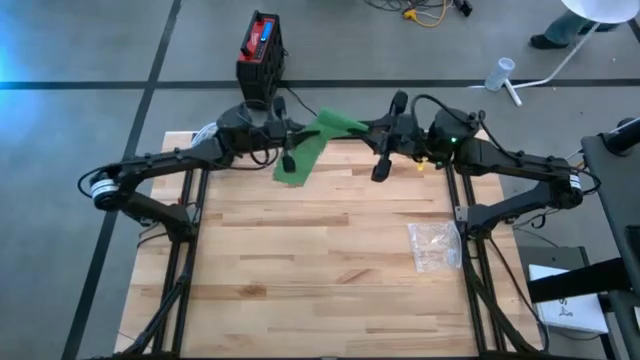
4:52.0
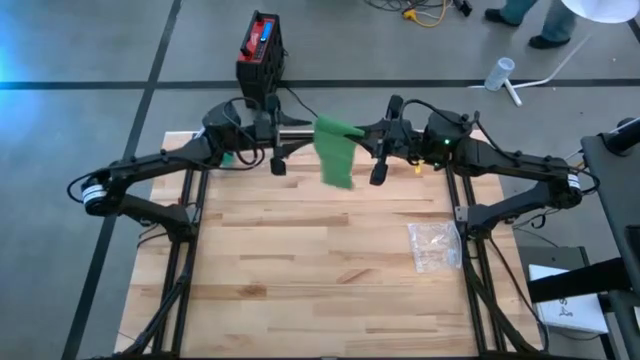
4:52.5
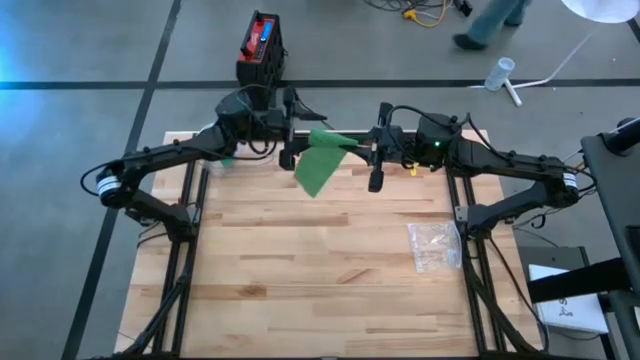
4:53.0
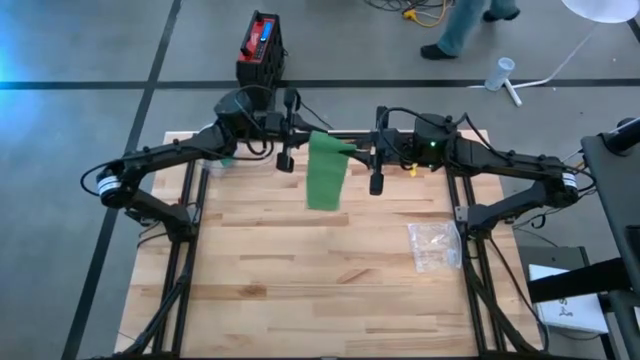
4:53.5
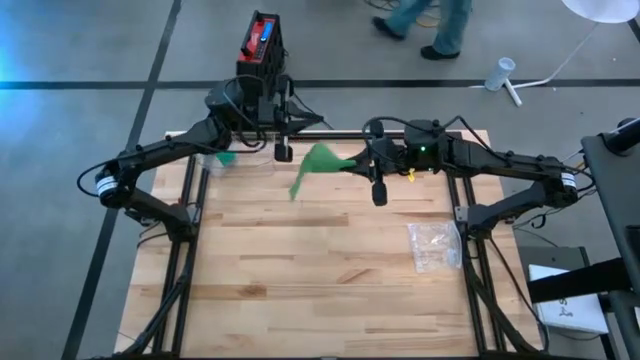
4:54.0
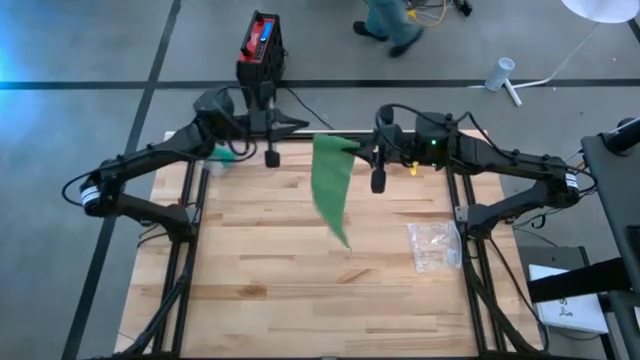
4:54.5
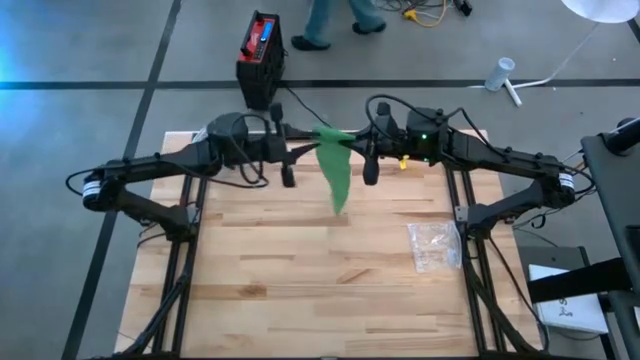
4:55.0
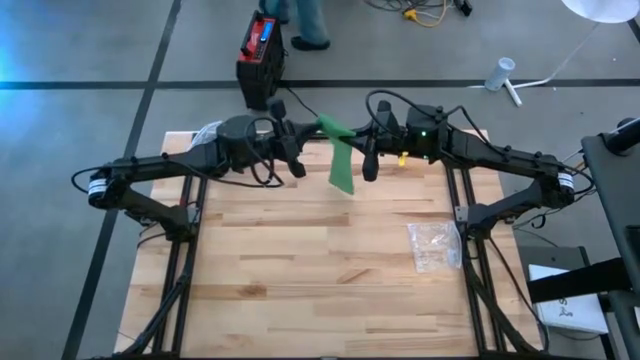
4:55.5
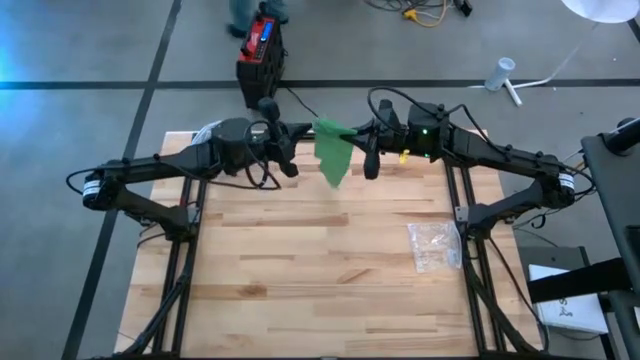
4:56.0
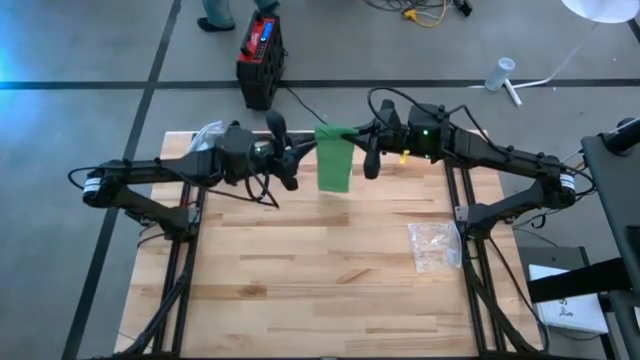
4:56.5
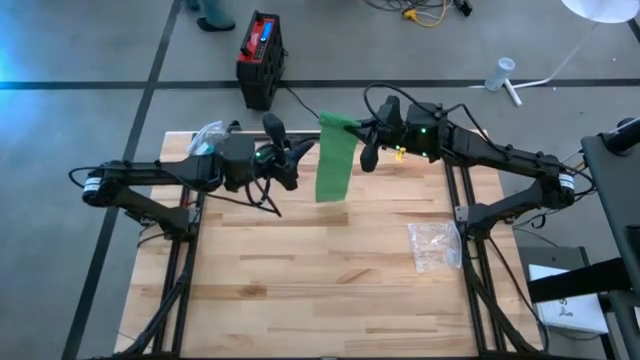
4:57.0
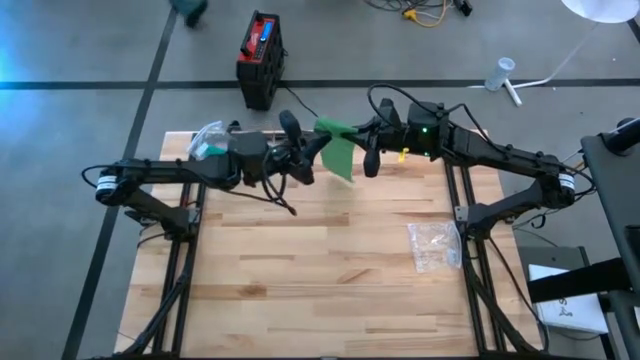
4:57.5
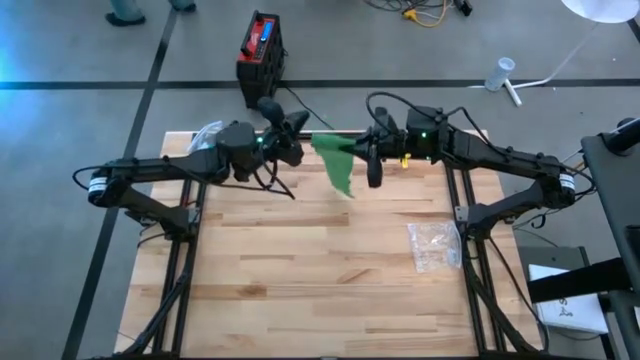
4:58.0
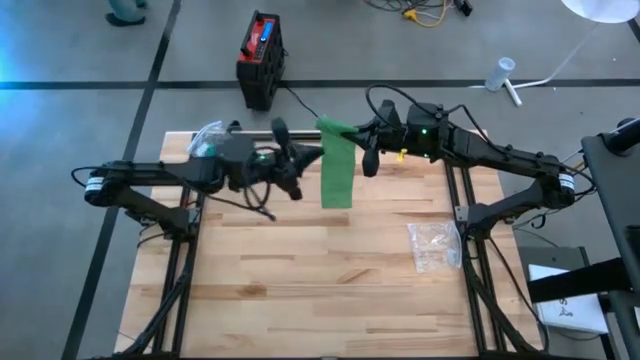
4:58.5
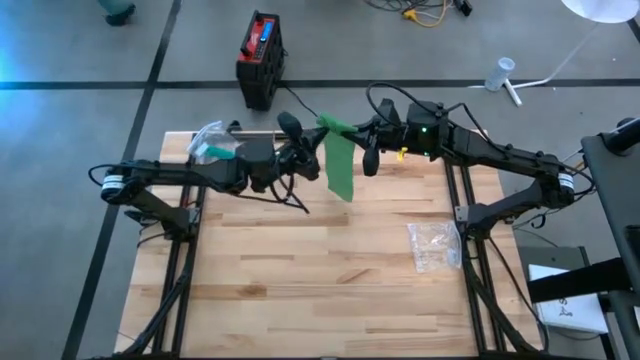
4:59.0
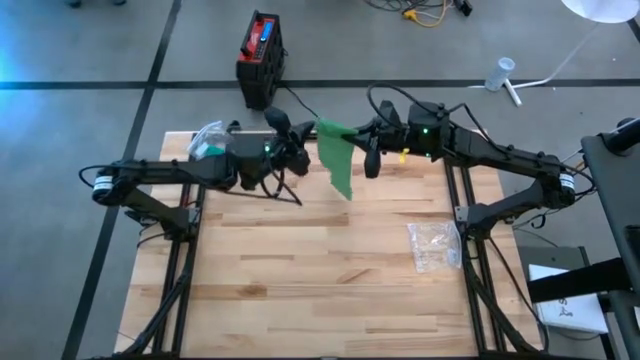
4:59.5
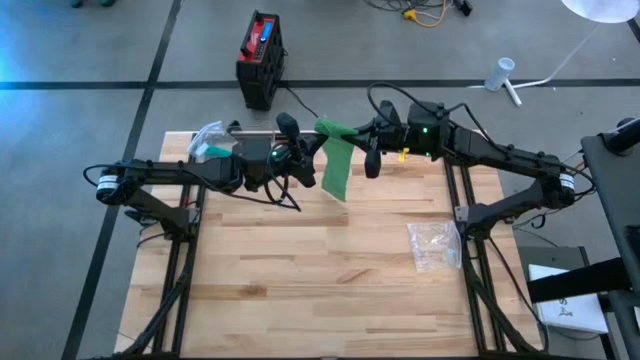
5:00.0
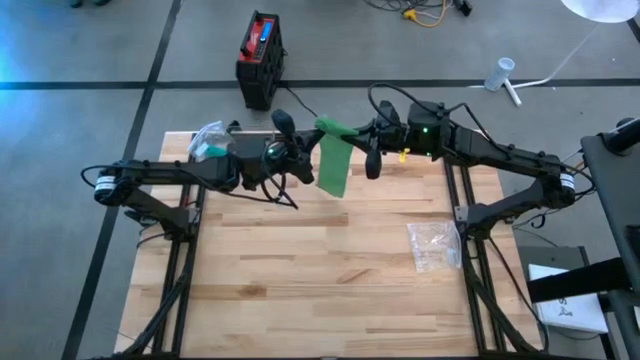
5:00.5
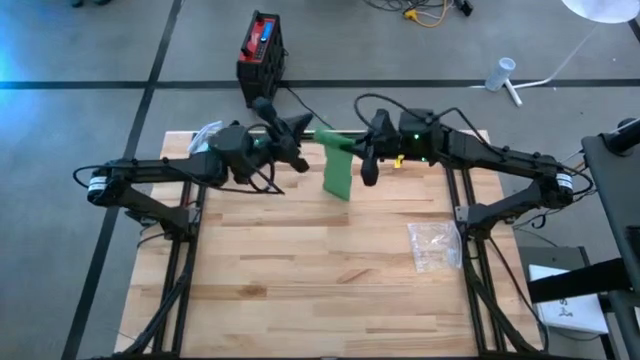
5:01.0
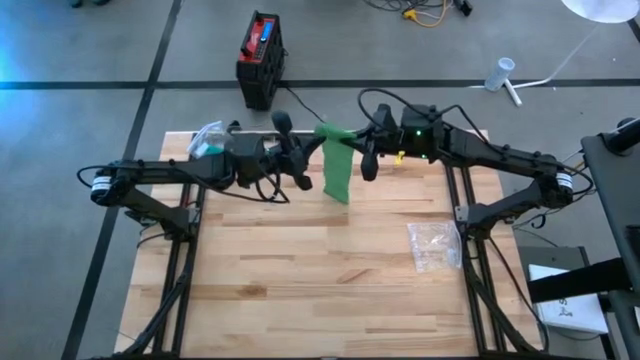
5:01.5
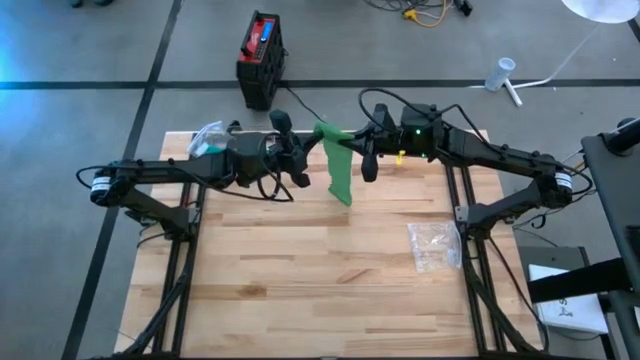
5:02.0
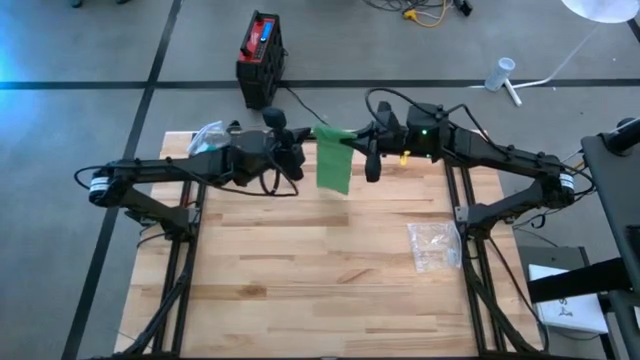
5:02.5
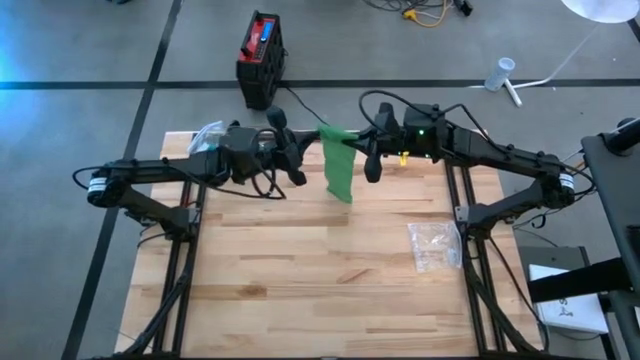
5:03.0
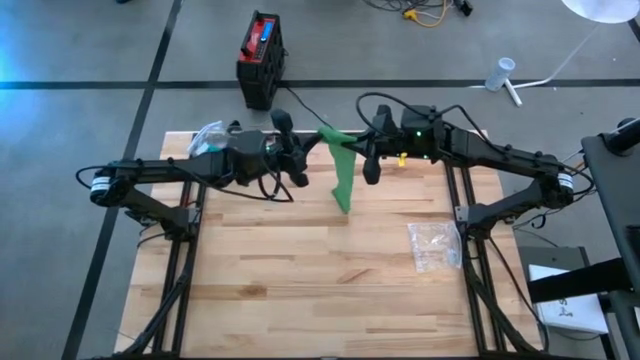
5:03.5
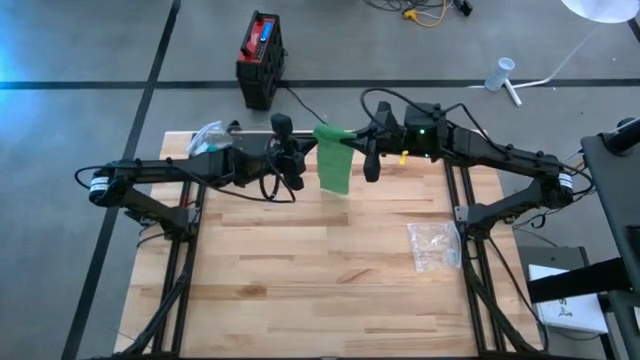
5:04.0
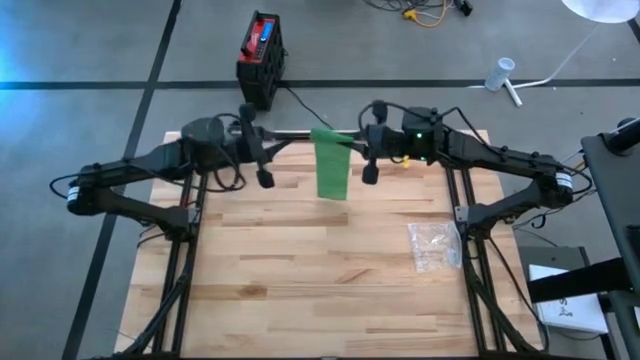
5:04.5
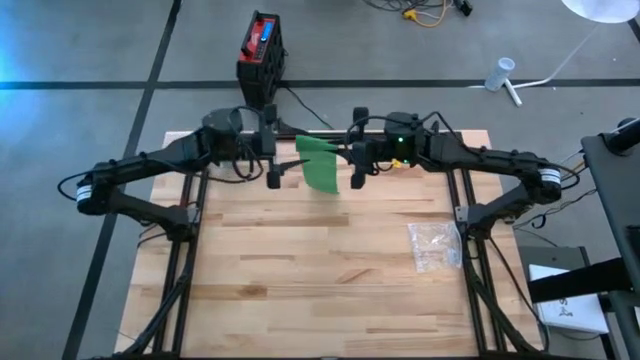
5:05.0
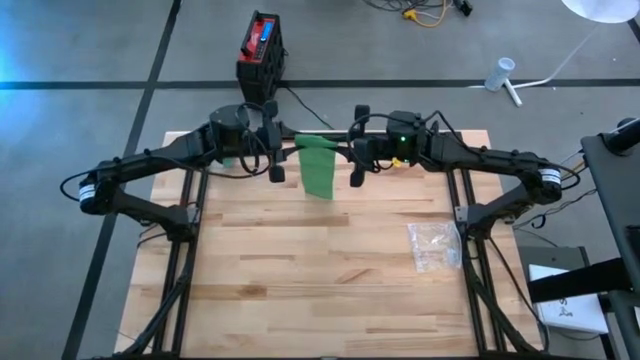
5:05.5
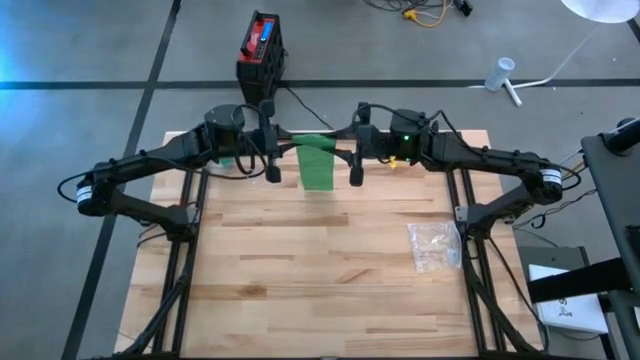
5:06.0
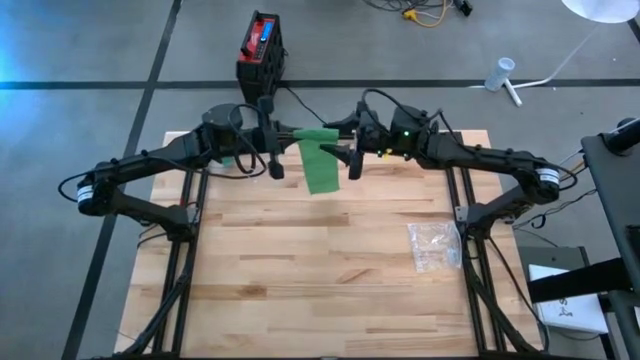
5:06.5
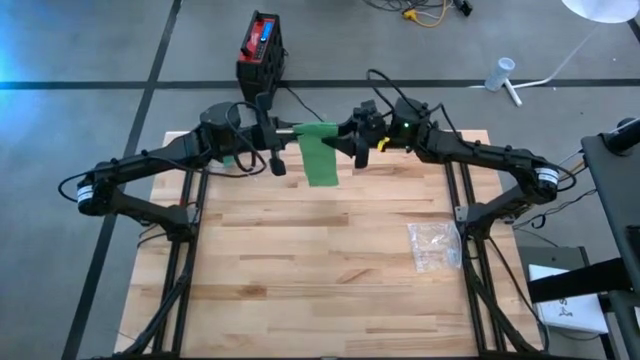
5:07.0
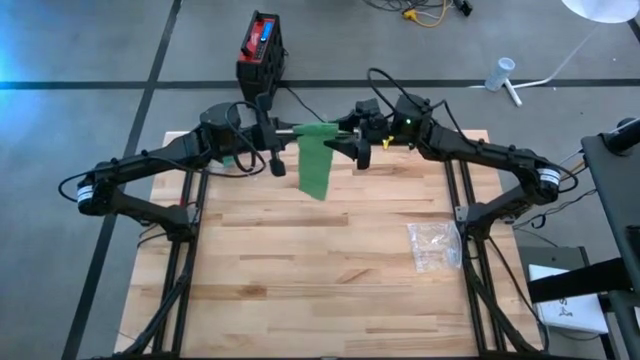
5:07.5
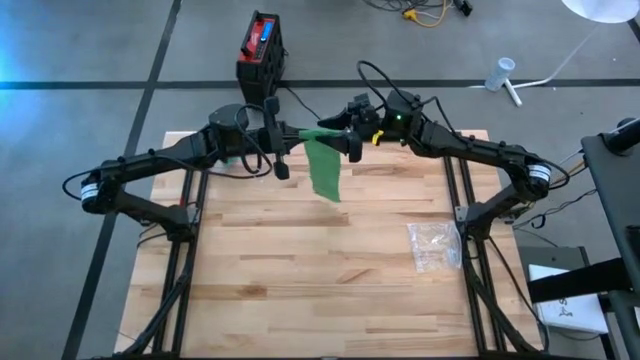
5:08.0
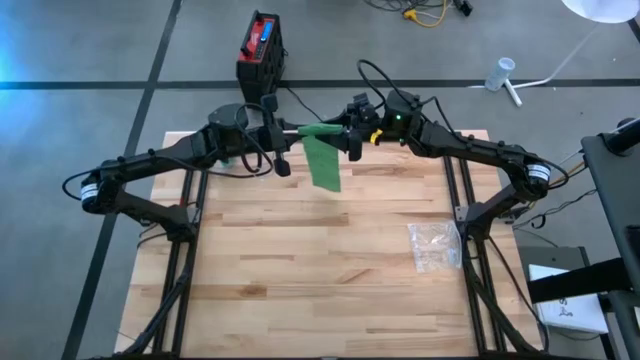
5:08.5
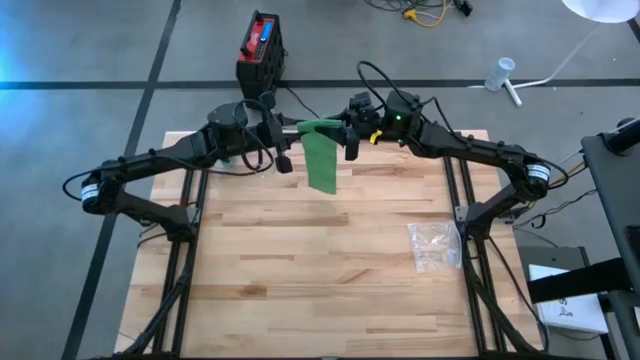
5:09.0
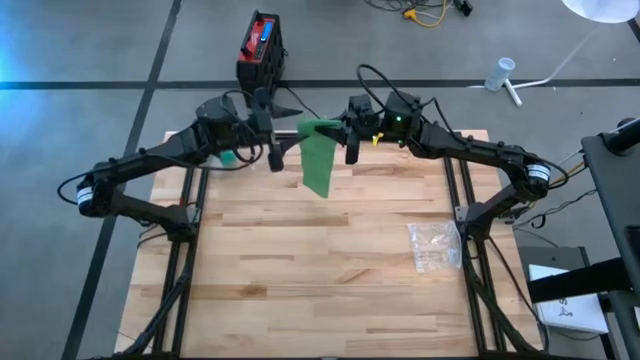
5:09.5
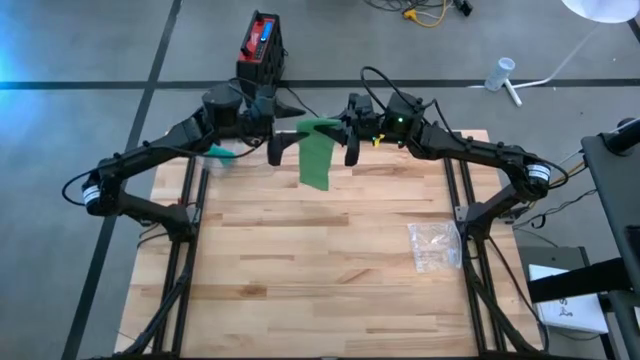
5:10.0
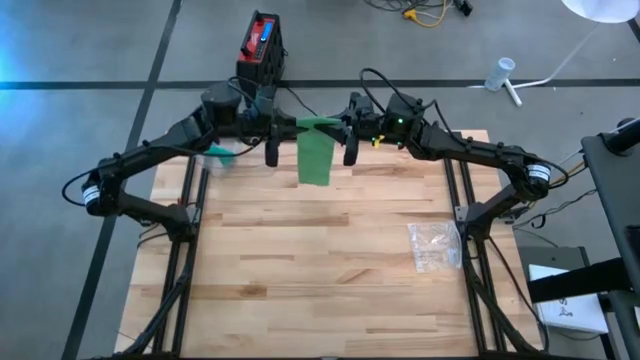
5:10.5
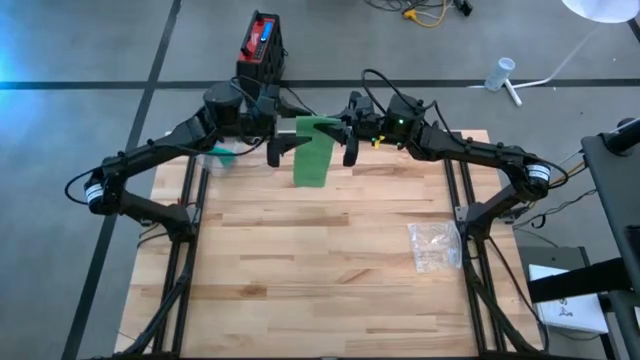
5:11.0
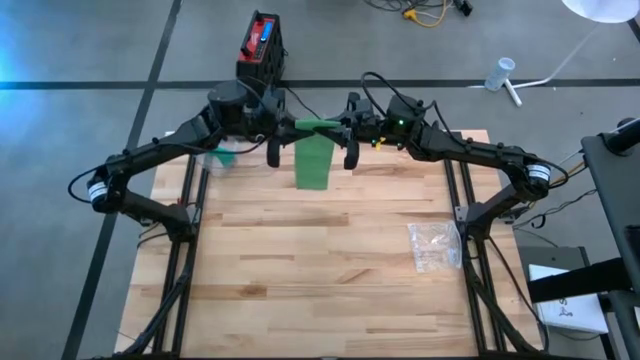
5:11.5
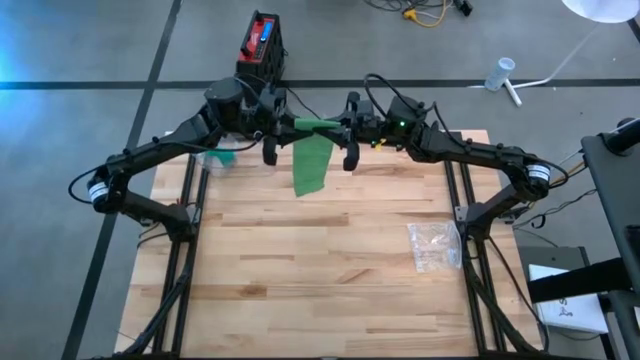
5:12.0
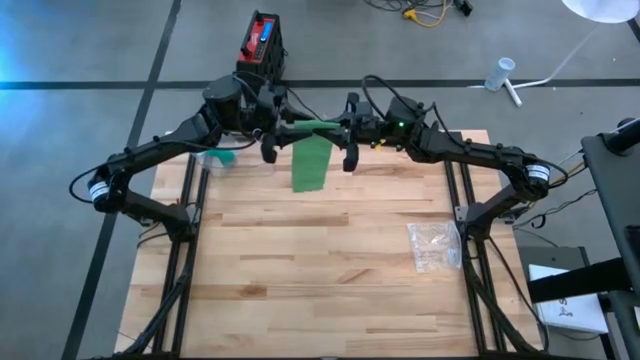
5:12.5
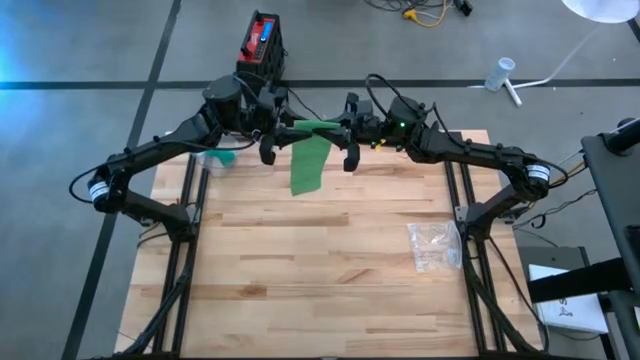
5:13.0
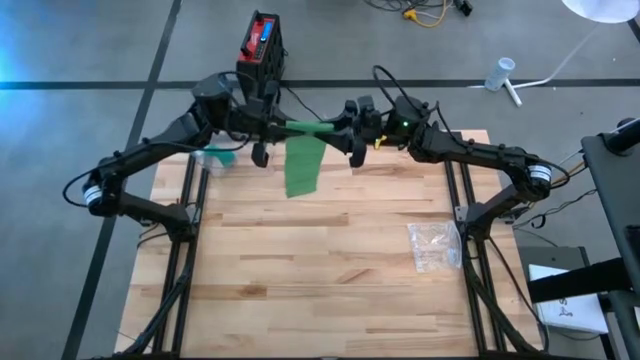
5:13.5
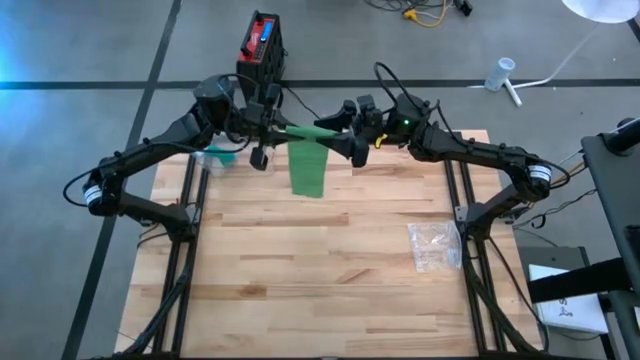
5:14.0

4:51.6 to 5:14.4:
Task: Roll bandage
Roll the green bandage
